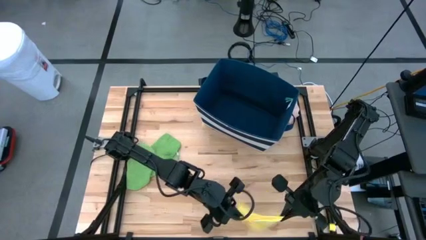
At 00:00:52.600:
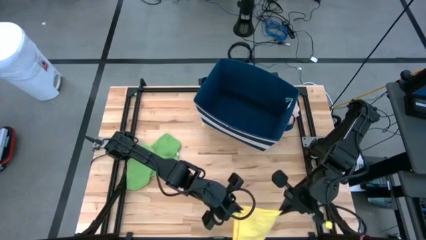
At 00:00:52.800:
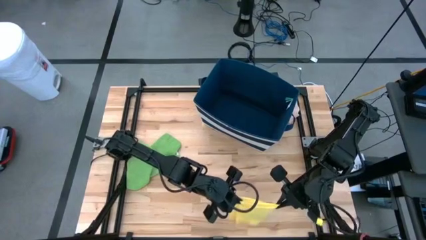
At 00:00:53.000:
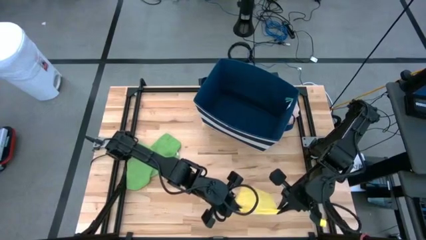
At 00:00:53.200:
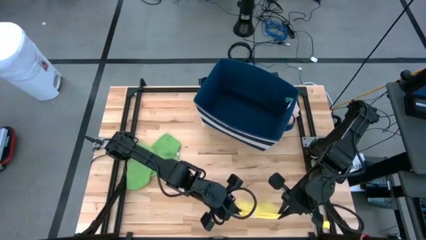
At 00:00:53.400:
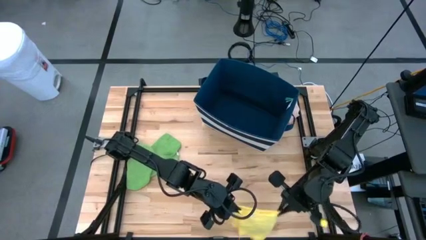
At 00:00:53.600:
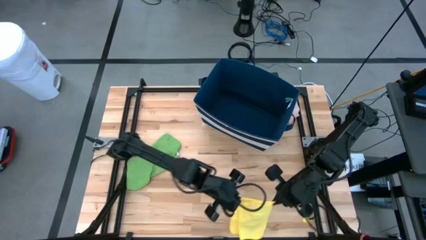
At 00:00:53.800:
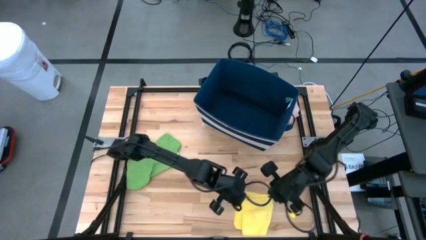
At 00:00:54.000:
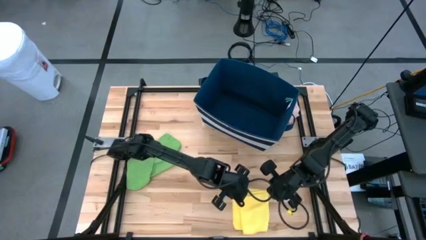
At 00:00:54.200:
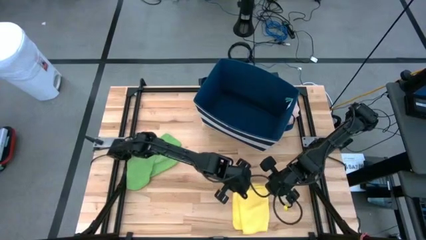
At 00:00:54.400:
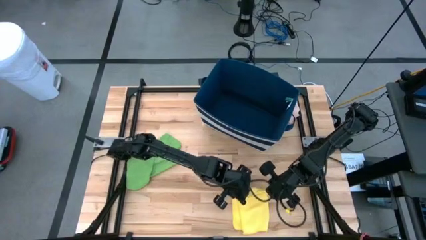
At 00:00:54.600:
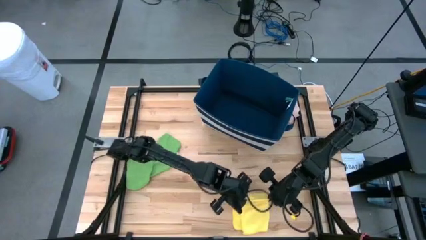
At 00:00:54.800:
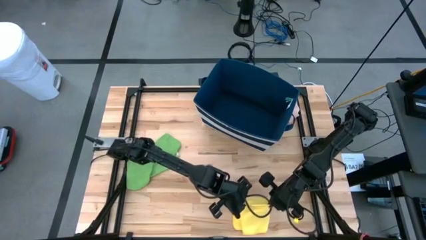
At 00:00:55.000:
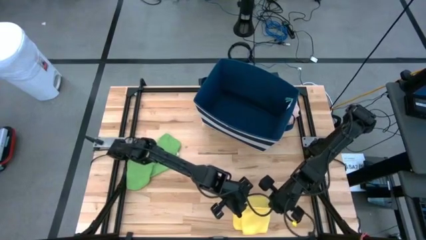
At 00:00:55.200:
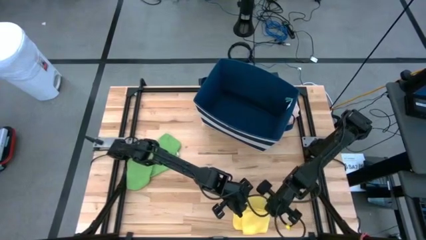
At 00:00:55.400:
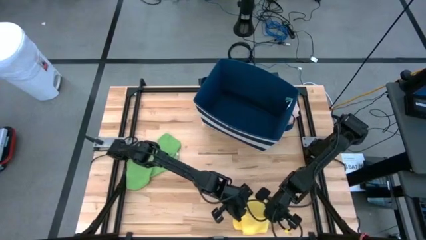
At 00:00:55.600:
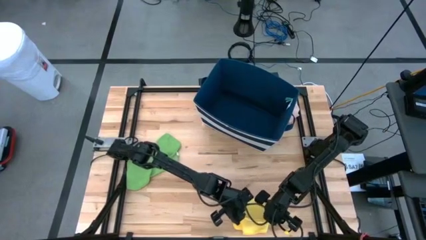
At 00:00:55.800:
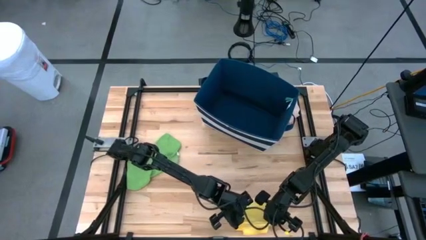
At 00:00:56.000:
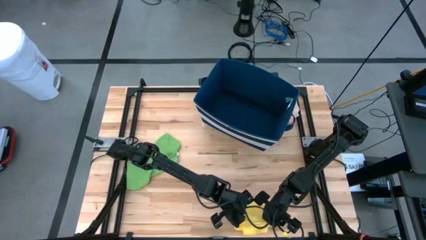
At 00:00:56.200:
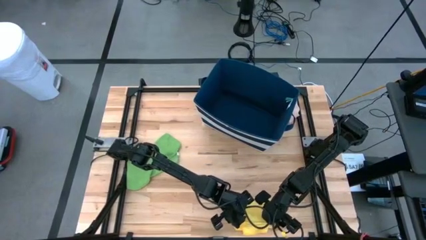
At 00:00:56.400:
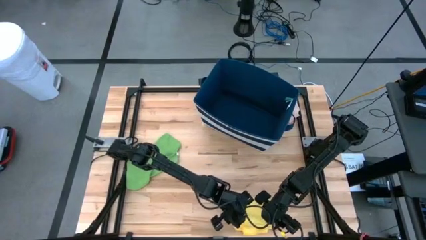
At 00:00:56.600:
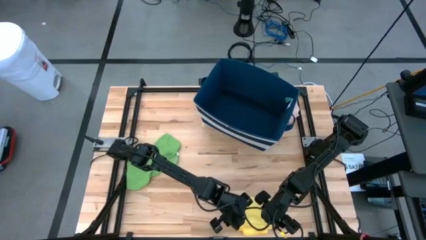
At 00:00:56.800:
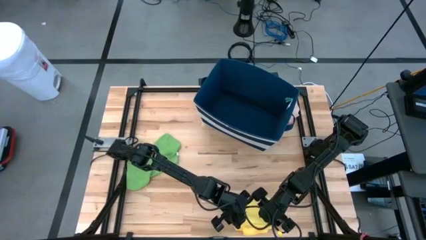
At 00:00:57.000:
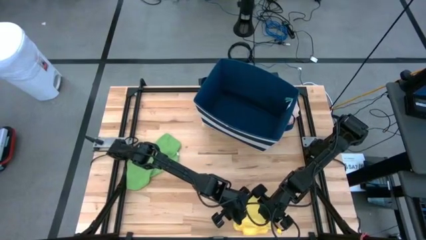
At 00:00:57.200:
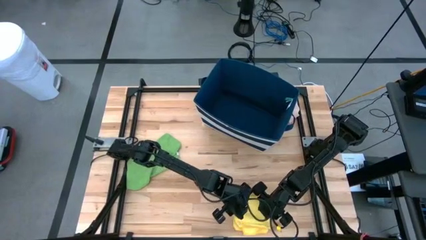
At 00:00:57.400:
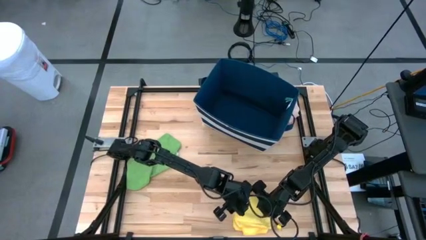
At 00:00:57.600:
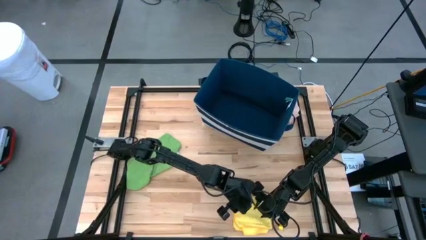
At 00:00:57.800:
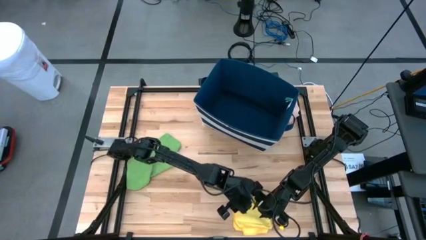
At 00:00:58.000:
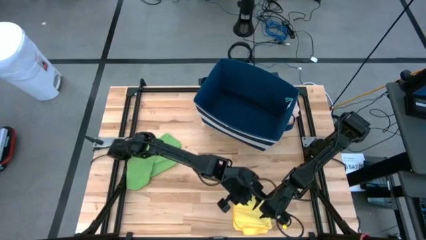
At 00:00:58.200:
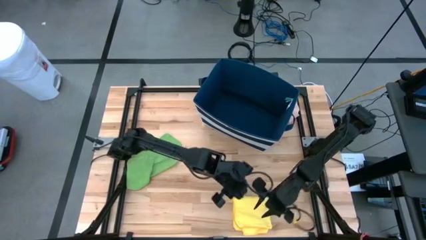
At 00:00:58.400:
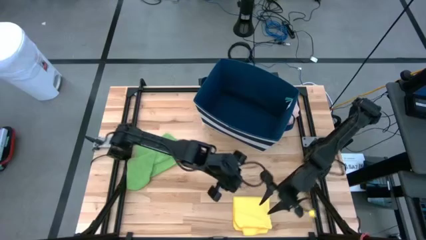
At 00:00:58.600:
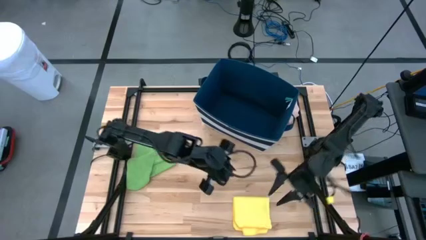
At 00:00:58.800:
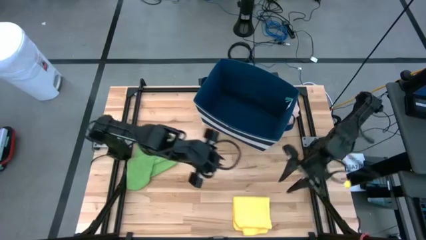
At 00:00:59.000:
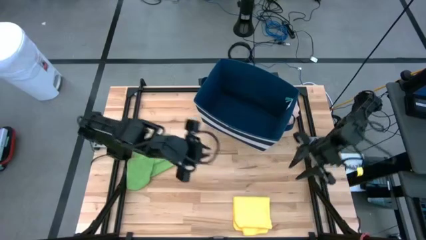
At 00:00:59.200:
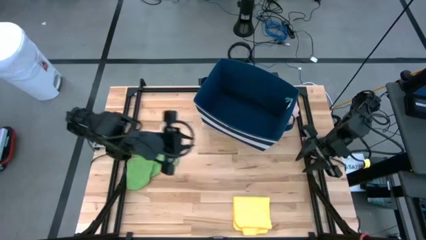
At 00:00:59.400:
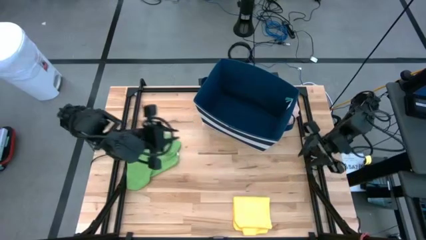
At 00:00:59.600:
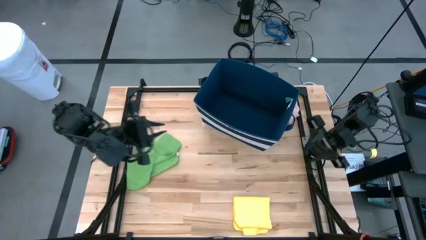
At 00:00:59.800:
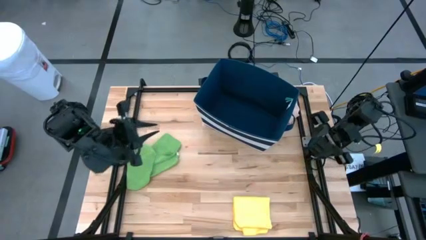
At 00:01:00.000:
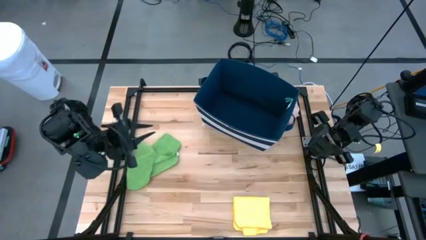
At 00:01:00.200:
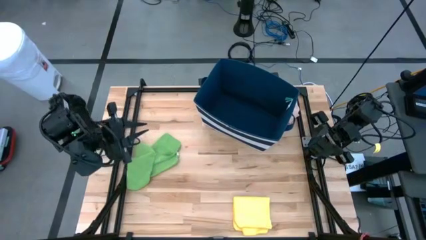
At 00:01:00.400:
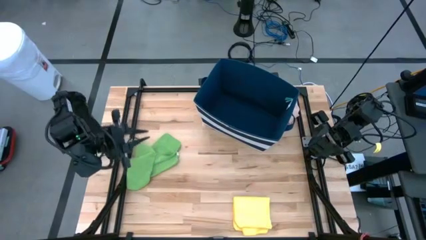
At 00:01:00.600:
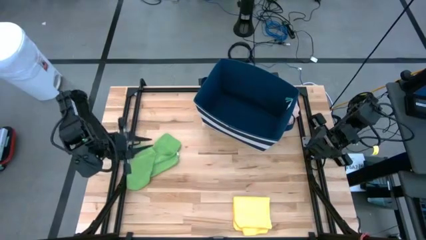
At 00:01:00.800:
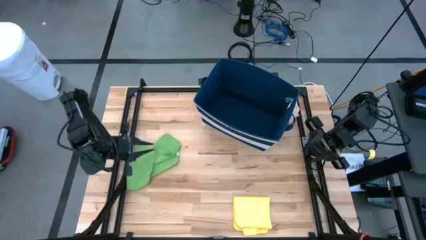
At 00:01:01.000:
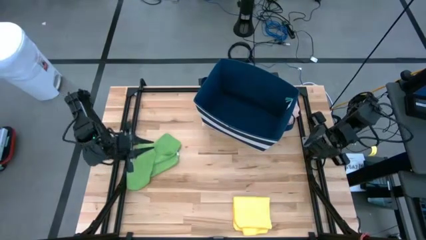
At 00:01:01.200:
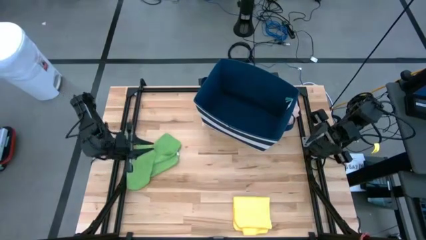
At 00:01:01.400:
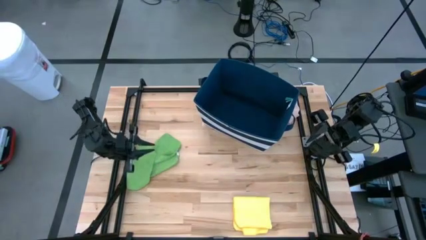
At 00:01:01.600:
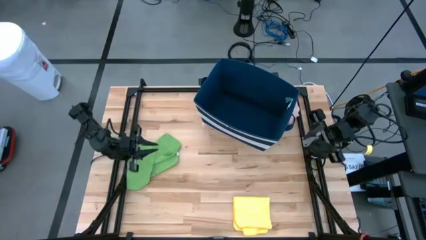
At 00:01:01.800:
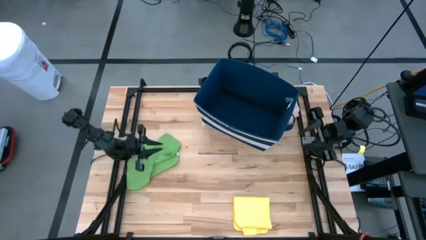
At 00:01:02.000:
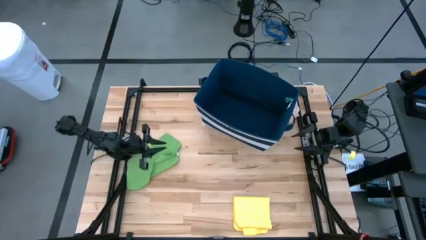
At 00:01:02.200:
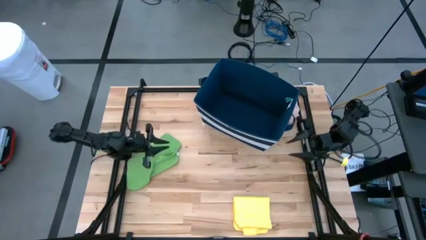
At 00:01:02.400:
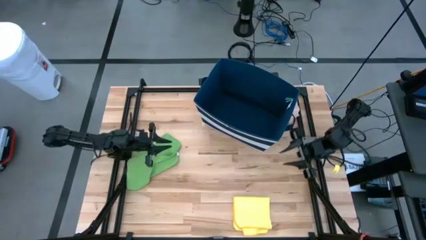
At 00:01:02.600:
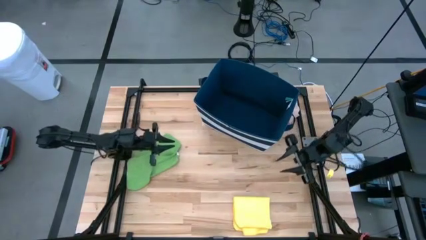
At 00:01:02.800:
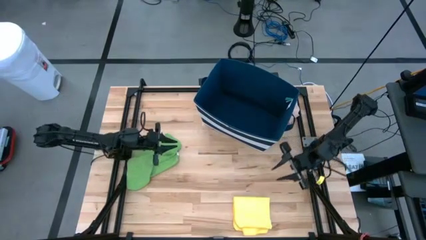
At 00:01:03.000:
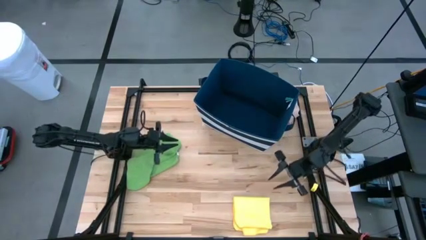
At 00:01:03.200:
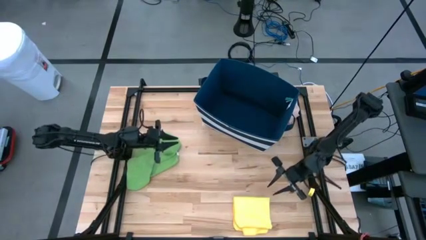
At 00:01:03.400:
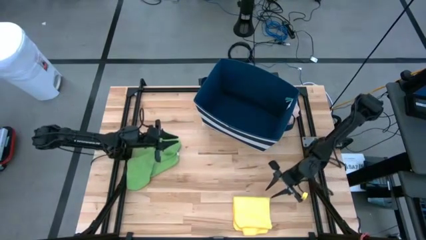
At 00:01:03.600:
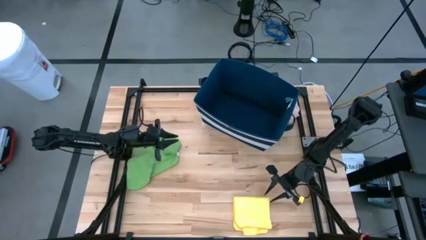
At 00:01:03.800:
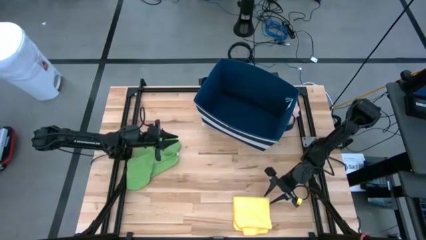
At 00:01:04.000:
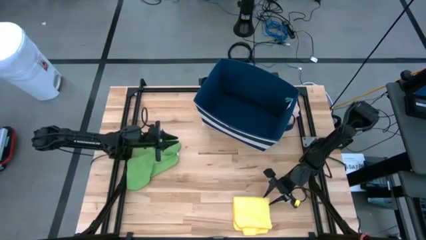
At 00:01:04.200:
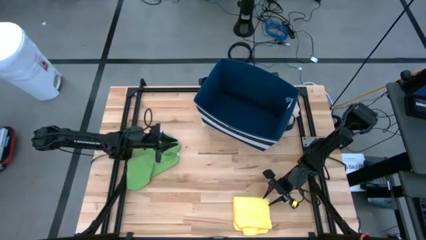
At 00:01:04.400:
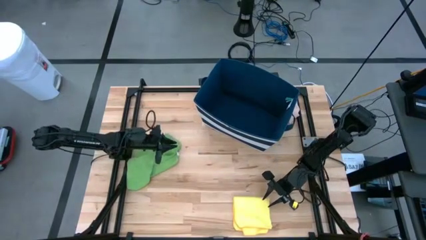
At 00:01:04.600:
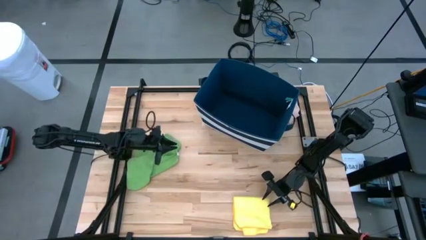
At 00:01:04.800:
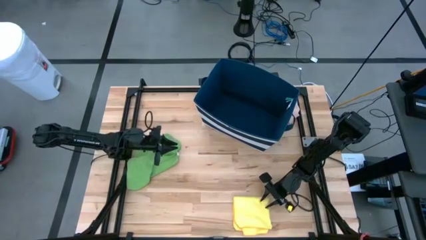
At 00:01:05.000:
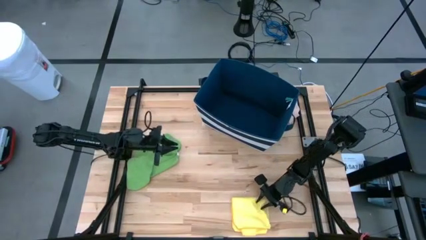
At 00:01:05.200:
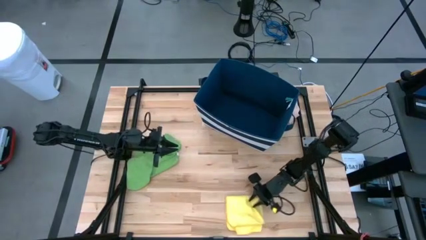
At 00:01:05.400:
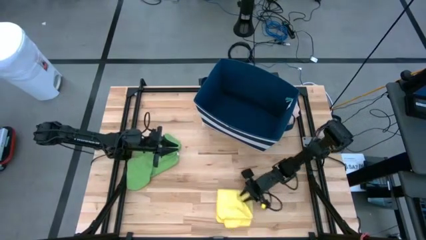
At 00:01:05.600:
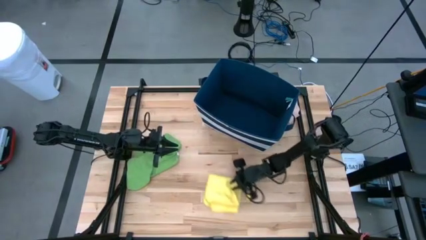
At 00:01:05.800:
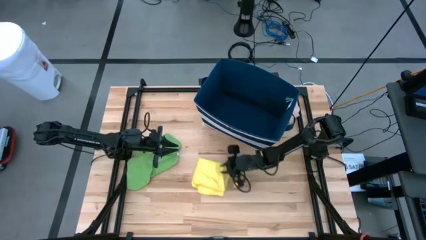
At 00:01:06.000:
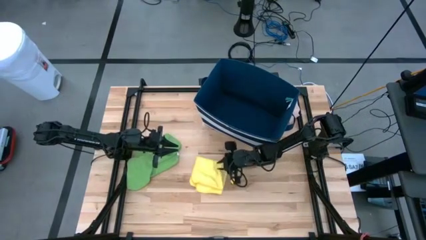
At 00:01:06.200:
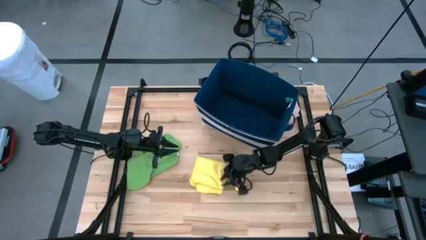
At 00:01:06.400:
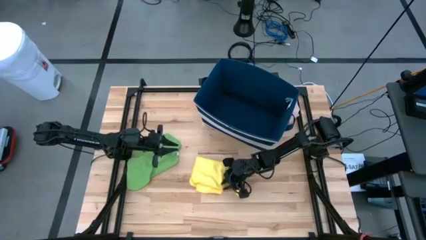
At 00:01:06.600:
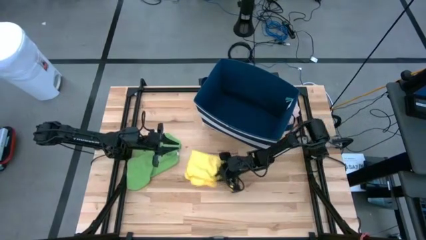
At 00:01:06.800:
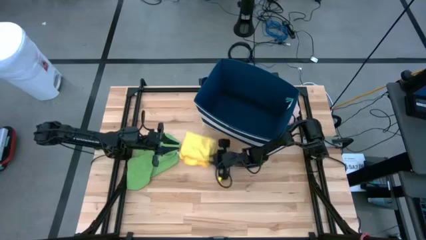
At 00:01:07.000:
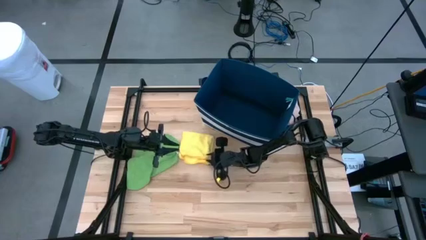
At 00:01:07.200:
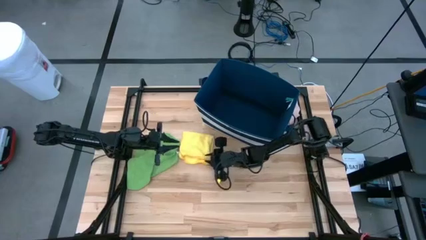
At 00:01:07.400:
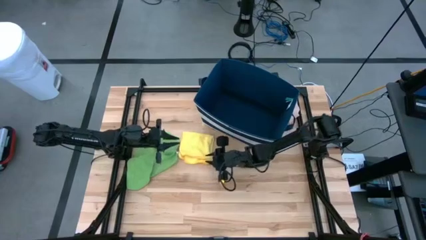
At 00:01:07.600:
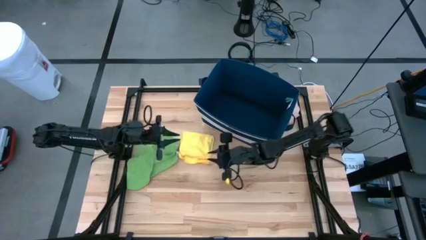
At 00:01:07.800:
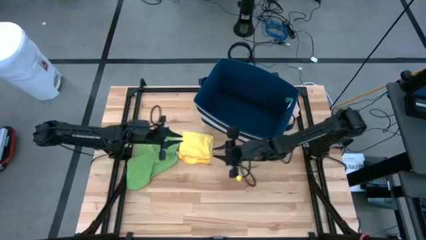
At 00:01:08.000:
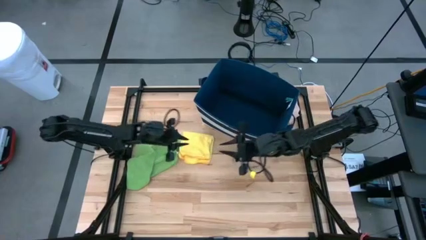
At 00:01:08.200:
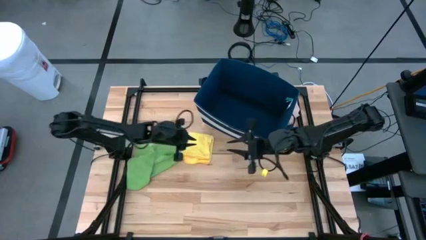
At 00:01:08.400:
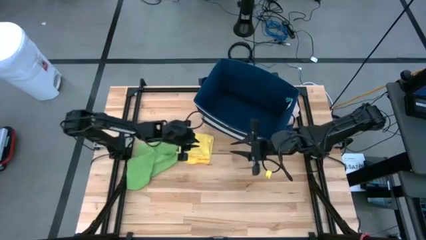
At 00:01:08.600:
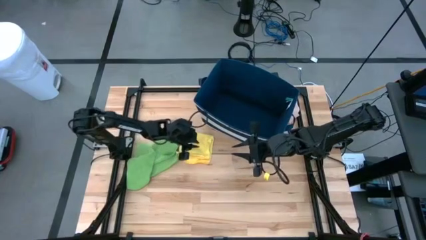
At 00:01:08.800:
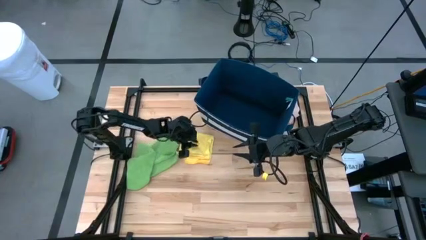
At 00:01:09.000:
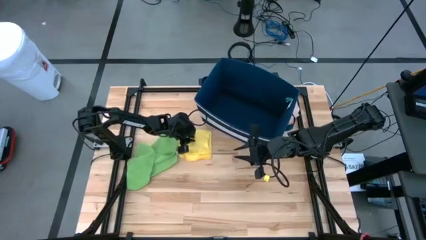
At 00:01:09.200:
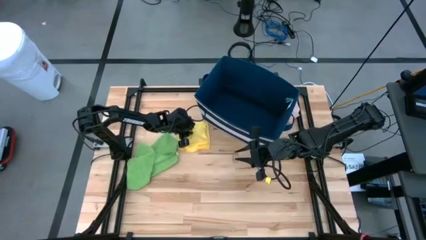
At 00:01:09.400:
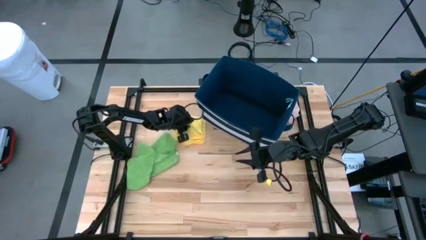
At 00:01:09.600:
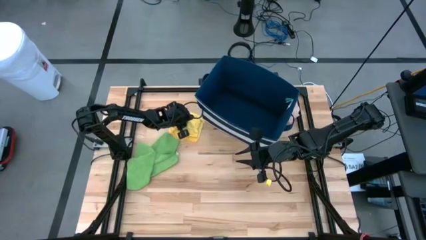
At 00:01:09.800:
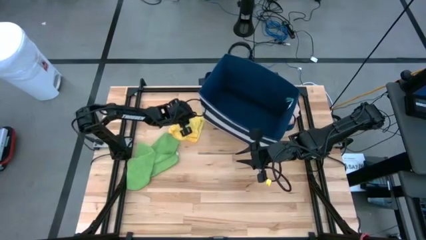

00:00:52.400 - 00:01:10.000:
Task: Fold towel
Fold the yellow towel
